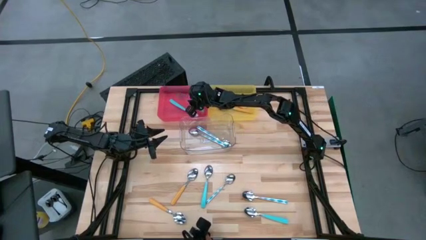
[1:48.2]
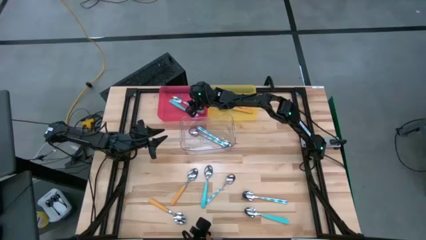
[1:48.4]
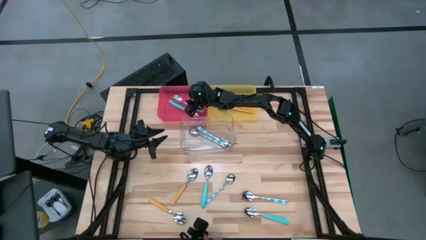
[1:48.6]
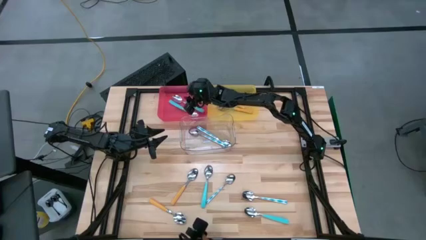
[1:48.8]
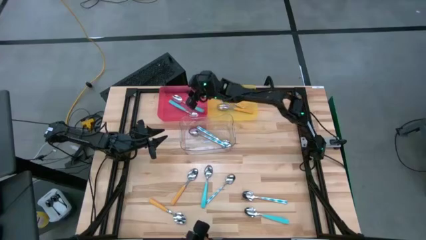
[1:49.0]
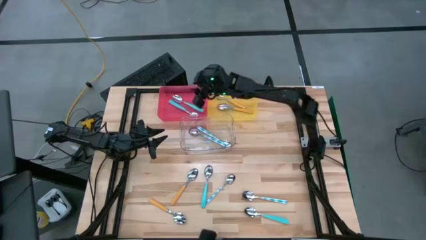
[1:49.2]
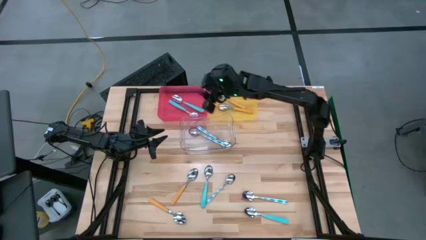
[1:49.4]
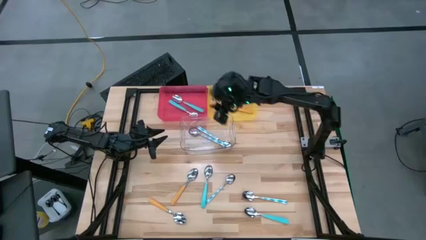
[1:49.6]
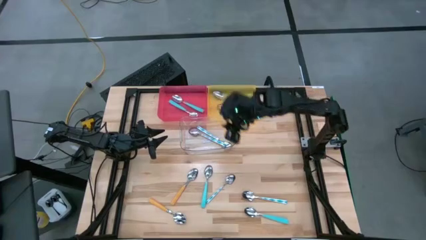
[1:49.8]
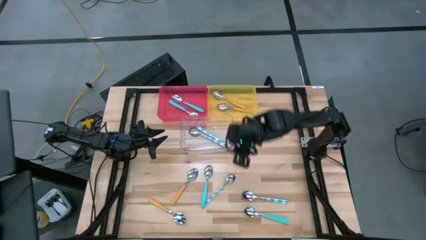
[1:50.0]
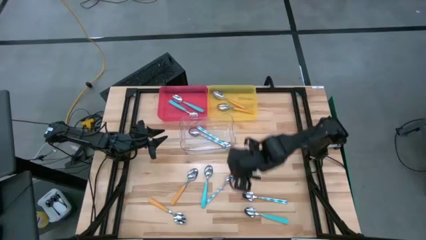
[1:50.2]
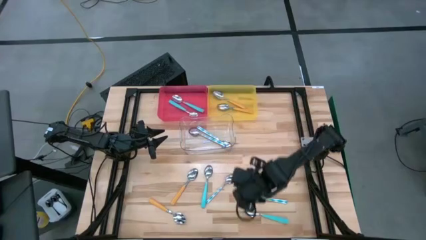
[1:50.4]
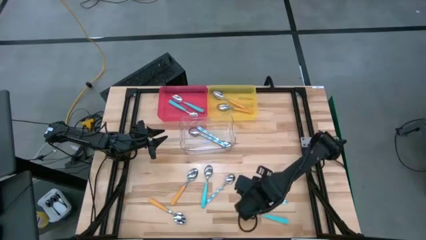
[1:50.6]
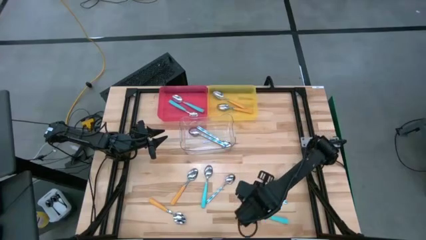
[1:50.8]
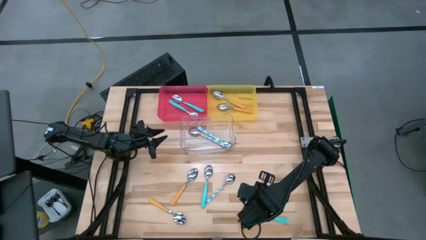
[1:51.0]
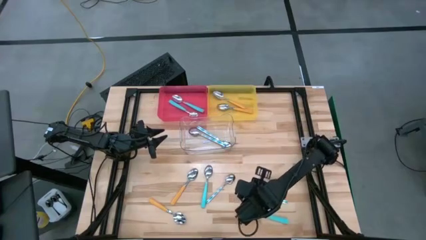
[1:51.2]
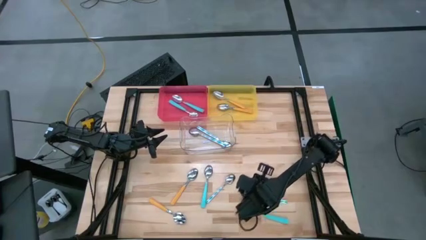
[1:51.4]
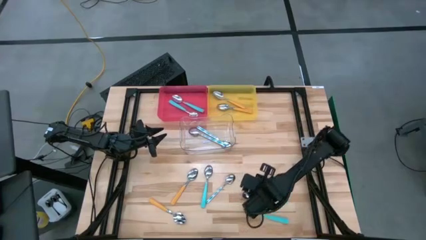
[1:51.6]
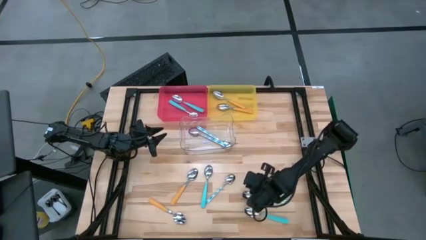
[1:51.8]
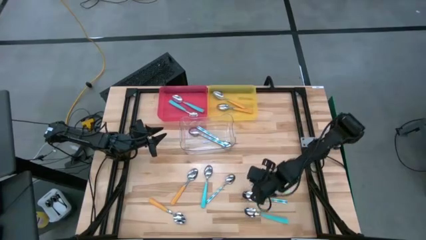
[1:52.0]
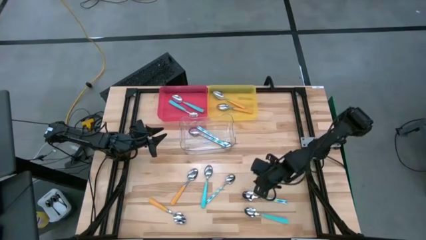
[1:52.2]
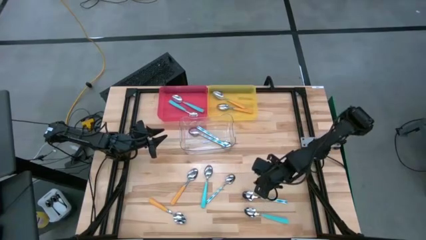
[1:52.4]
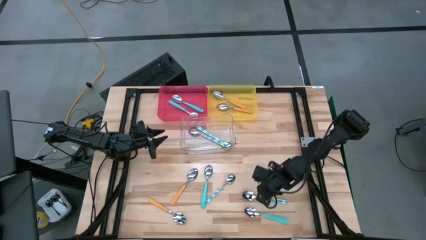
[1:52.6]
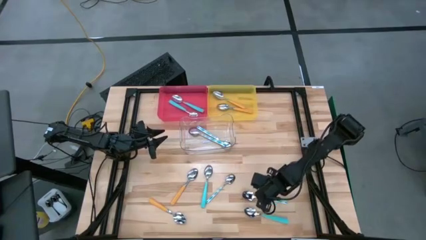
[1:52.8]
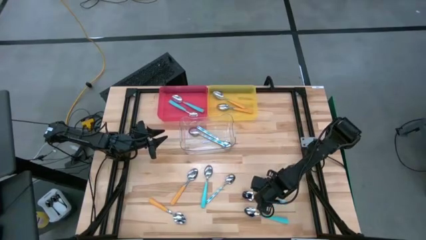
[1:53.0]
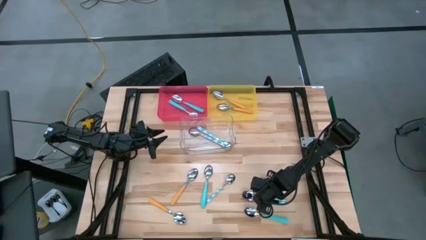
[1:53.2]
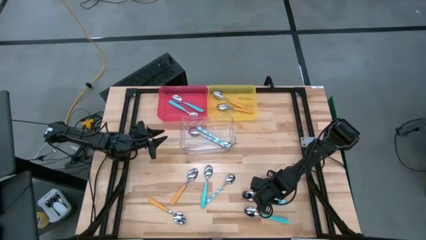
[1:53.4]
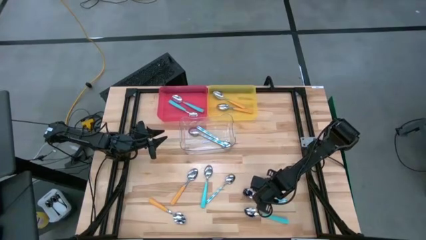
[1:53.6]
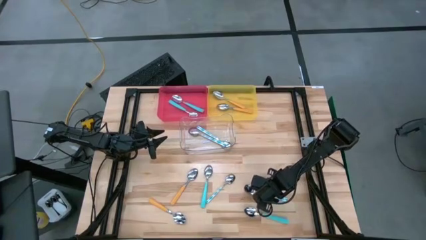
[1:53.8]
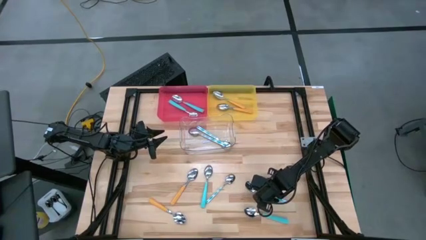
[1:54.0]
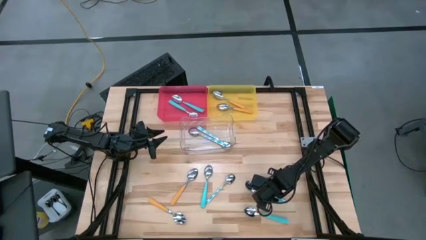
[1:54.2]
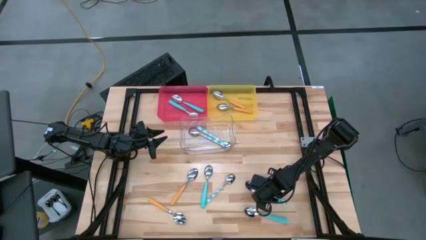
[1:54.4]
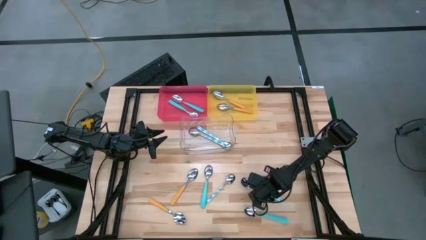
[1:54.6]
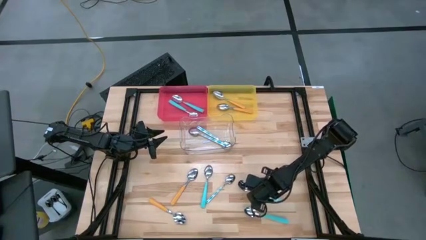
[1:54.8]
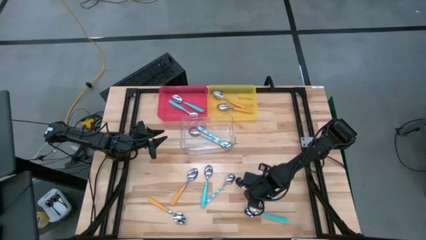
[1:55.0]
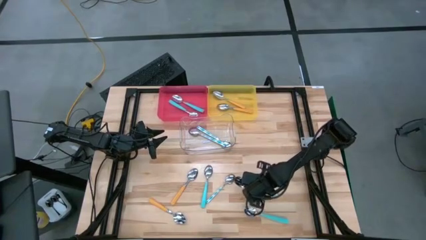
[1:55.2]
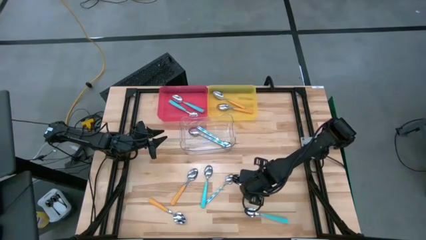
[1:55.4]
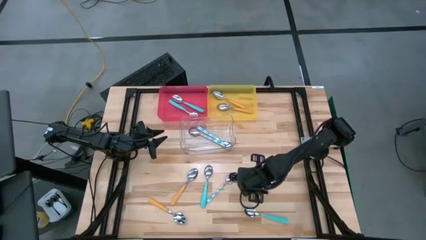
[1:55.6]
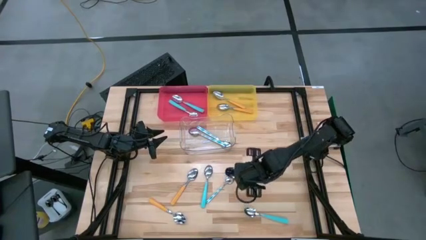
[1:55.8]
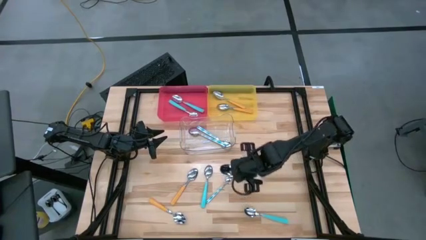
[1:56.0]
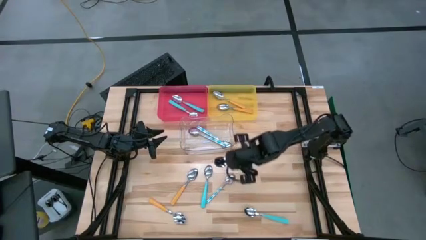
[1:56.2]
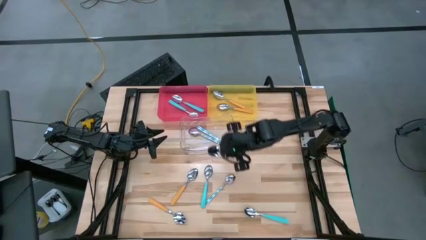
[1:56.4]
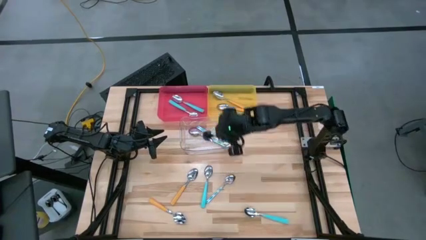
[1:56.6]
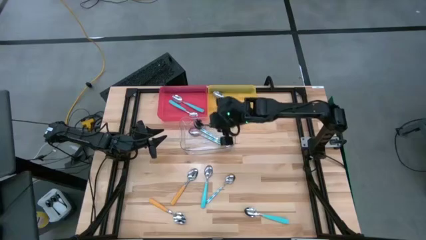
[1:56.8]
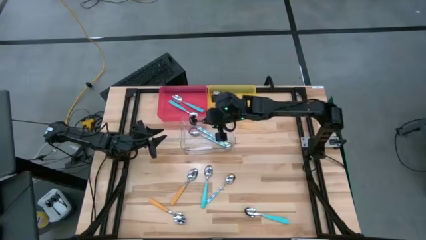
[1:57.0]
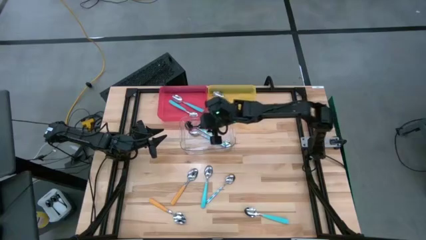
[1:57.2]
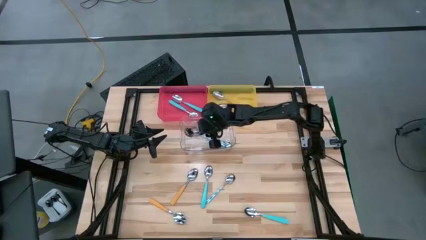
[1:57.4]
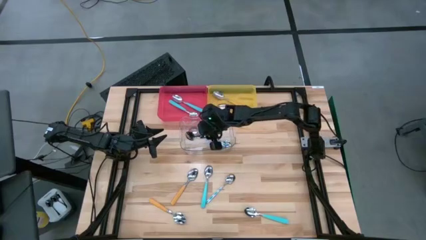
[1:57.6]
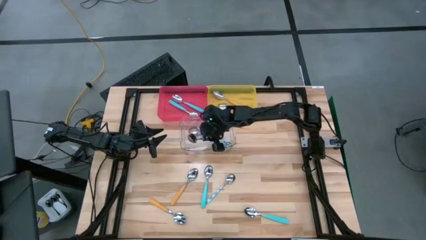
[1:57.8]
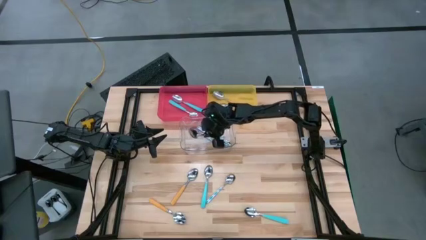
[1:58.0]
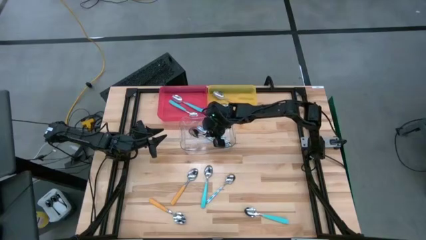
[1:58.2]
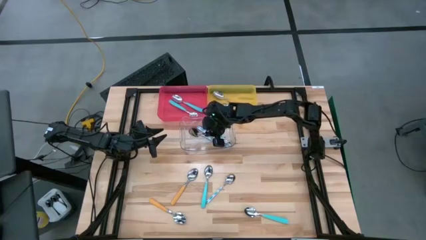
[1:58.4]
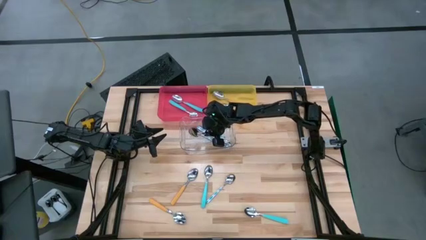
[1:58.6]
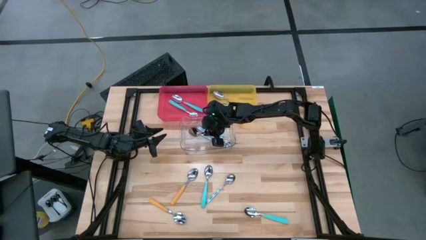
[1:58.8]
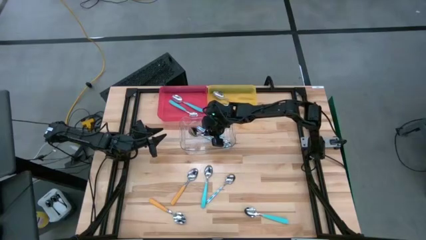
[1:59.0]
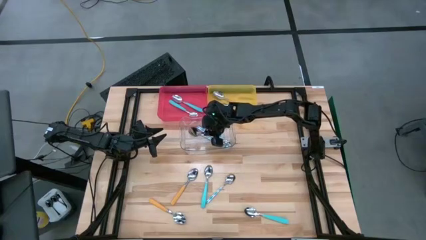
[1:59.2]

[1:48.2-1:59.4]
Task: Sort silverware by color (type)
Put the green patterned spoon into the transparent bin
